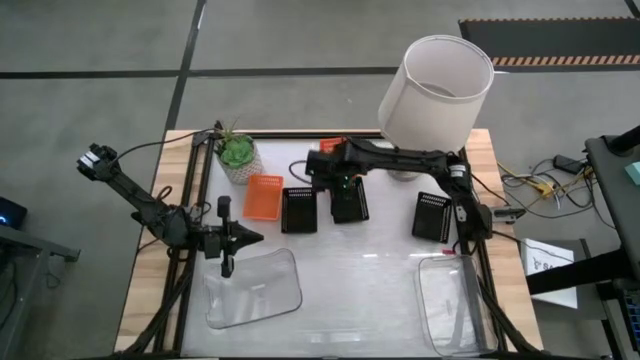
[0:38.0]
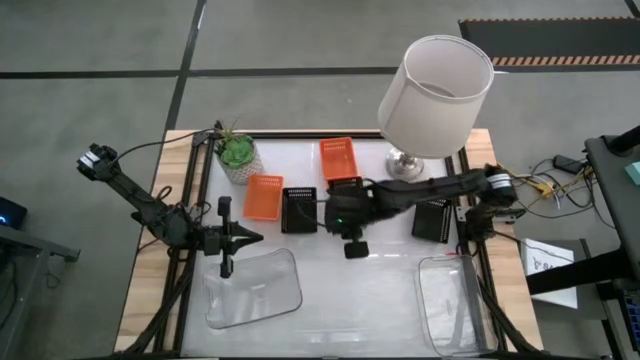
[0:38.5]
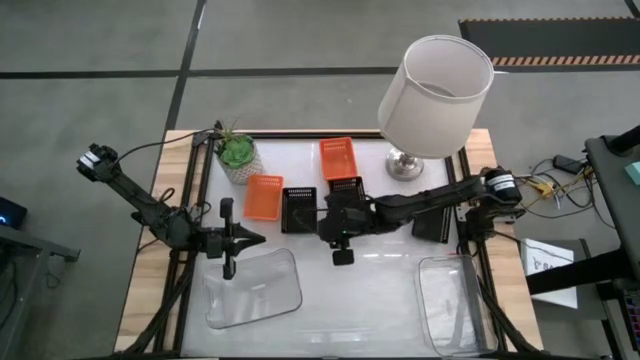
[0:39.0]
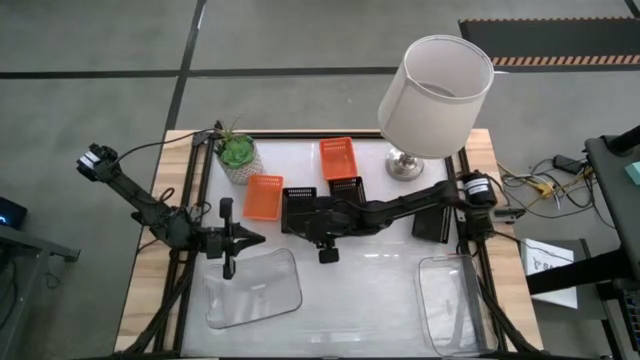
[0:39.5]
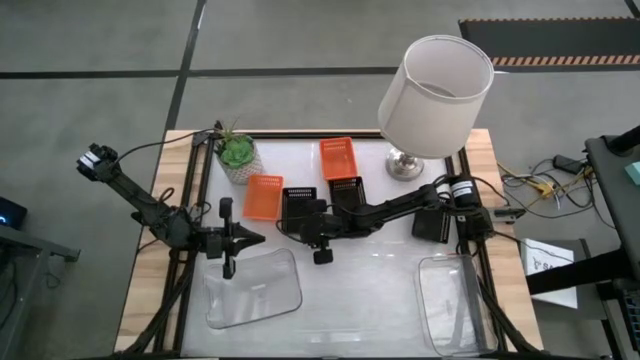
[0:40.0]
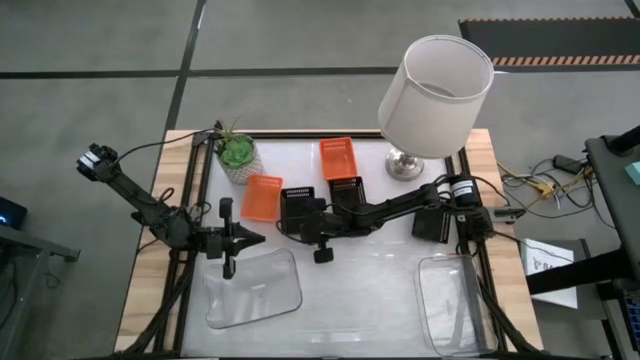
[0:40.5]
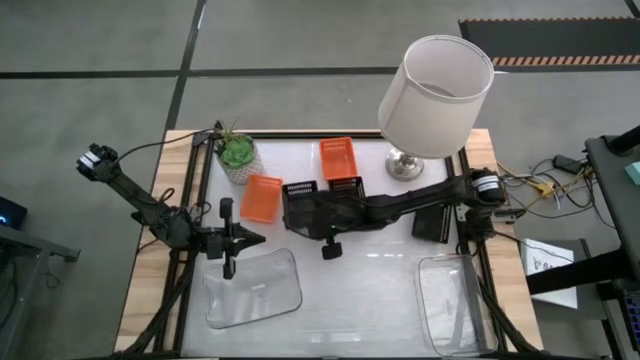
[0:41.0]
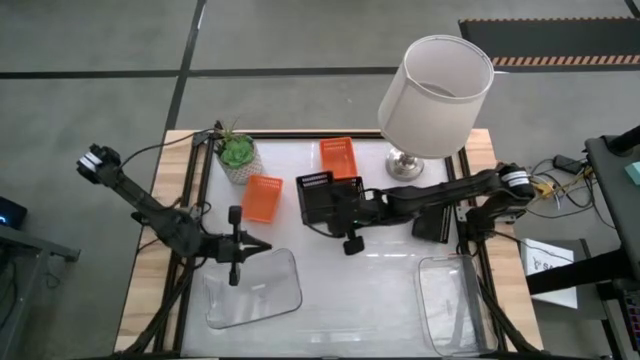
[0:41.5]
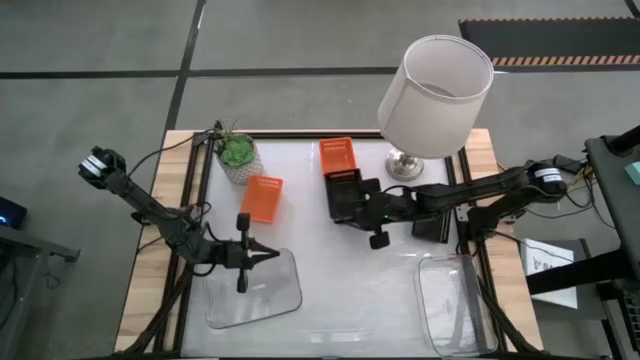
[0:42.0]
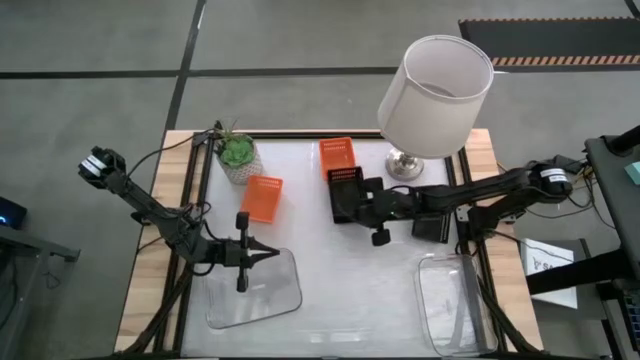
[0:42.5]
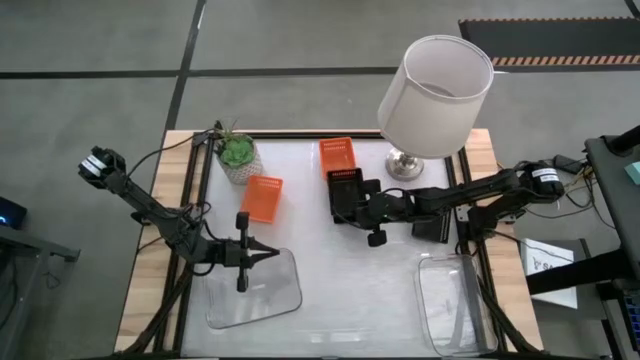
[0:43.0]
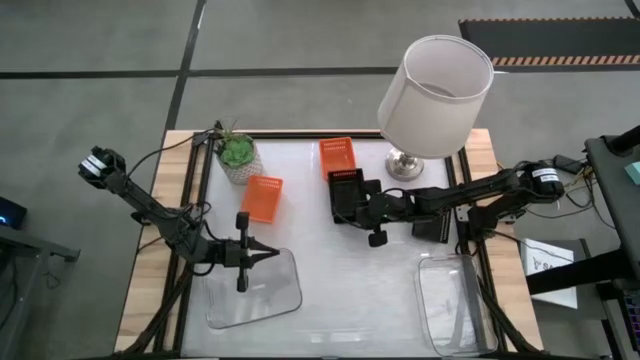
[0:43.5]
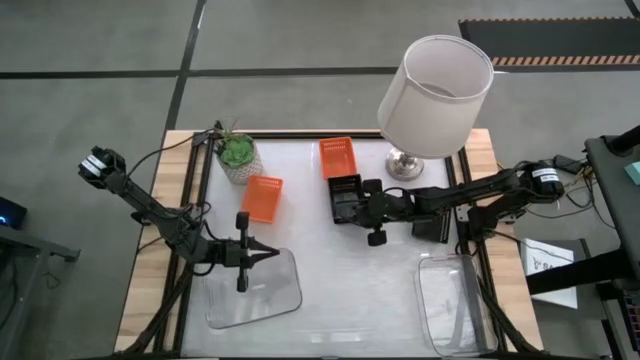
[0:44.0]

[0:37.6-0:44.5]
Stack the left black bin on the middle black bin

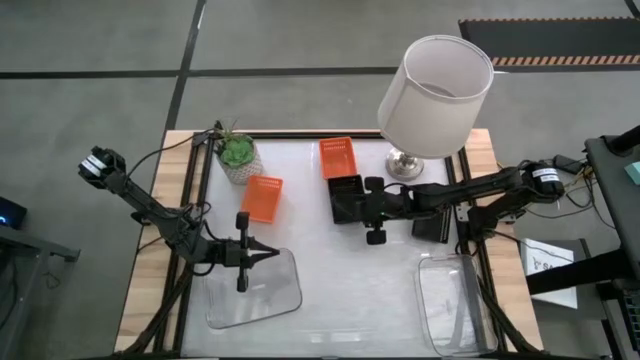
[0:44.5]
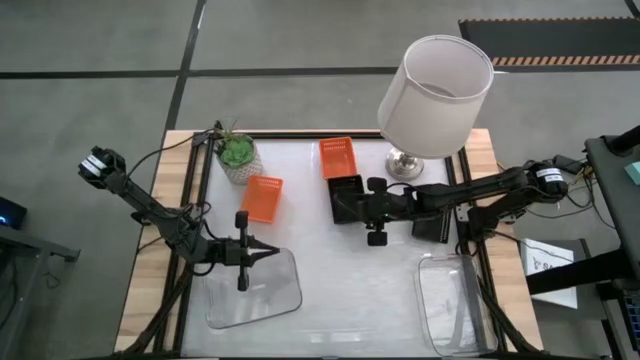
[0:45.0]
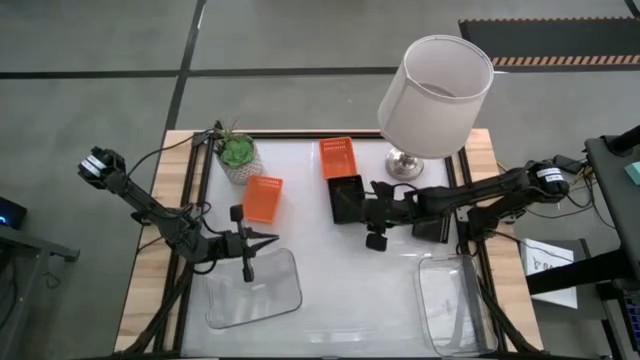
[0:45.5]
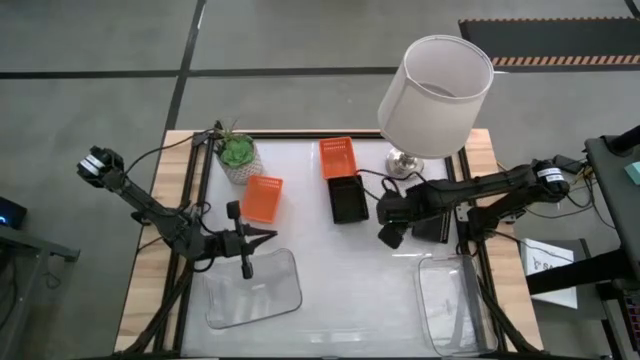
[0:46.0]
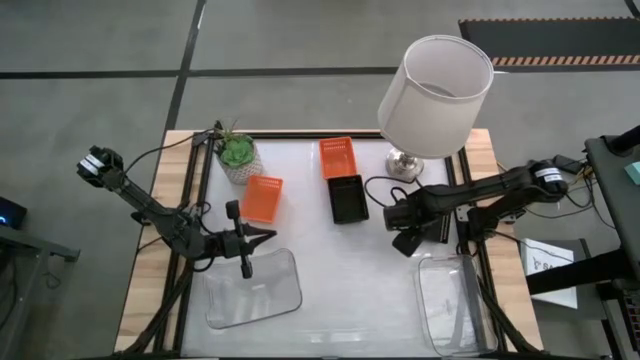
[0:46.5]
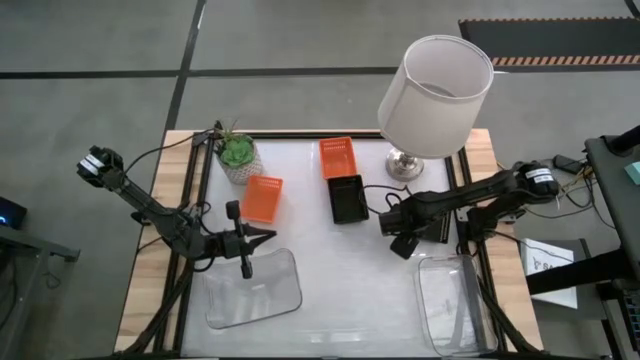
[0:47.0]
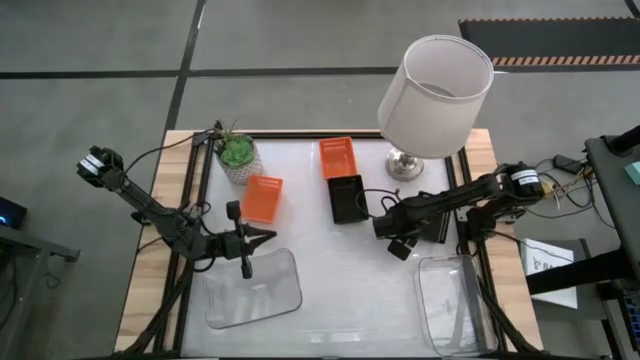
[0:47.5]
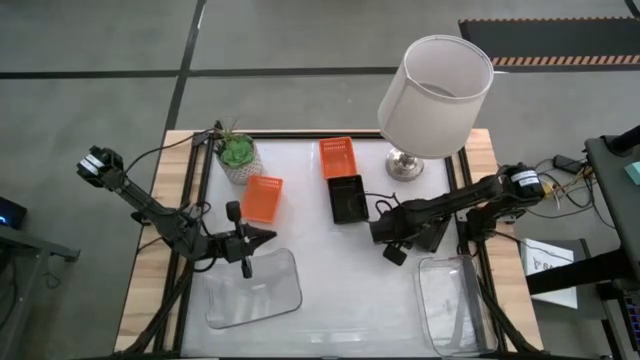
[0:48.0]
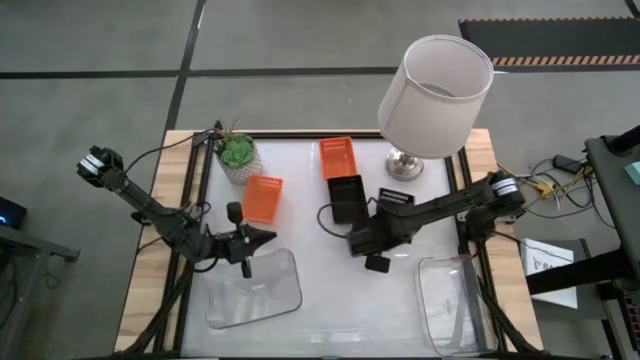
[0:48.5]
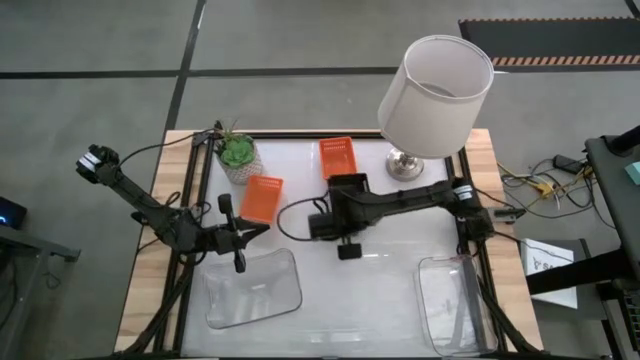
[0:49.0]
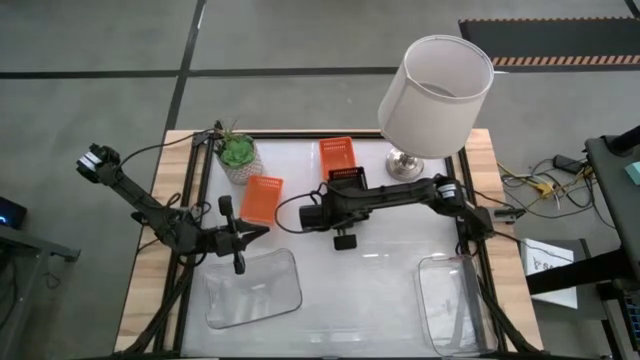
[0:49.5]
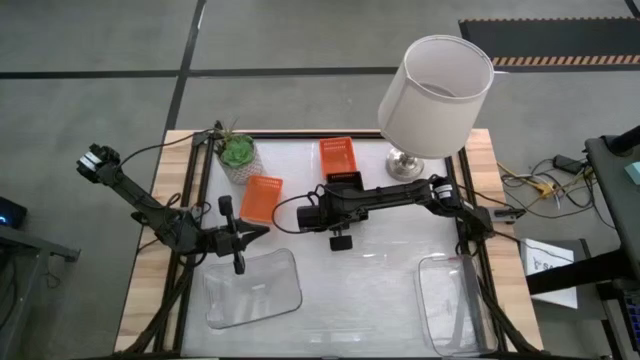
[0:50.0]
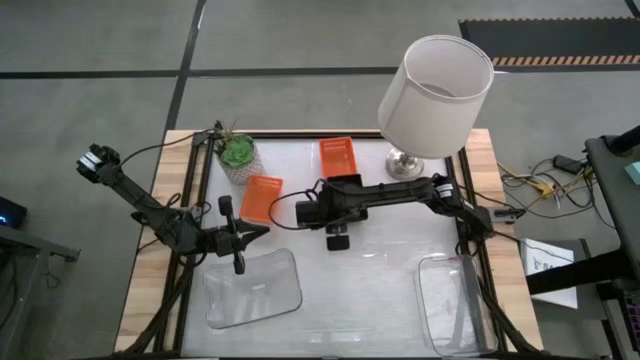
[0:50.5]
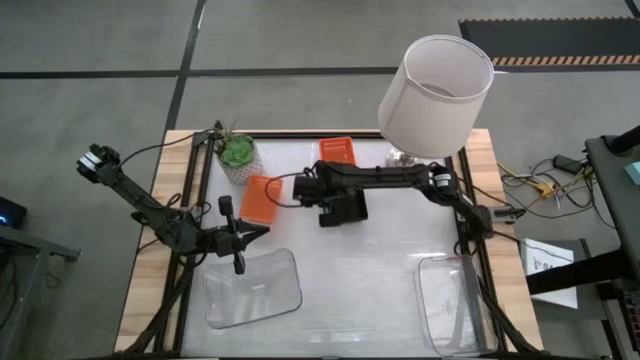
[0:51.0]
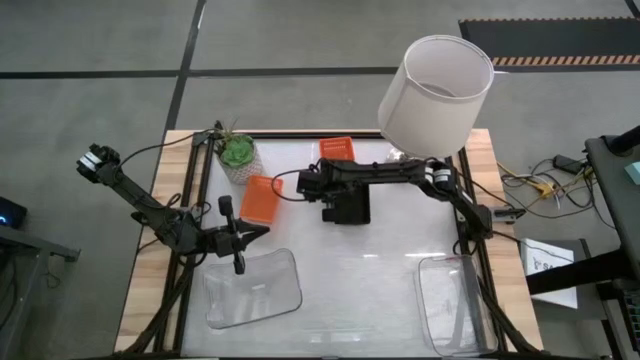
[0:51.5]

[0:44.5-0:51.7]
Stack the right black bin on the stacked black bins

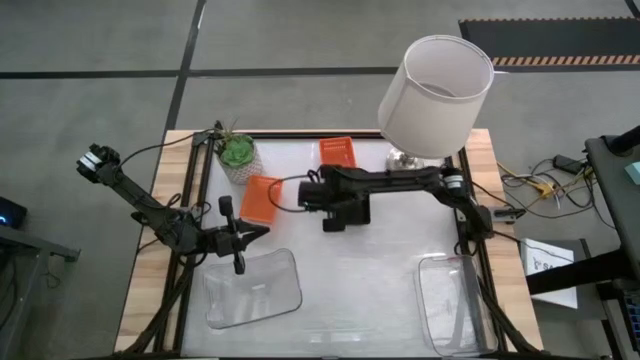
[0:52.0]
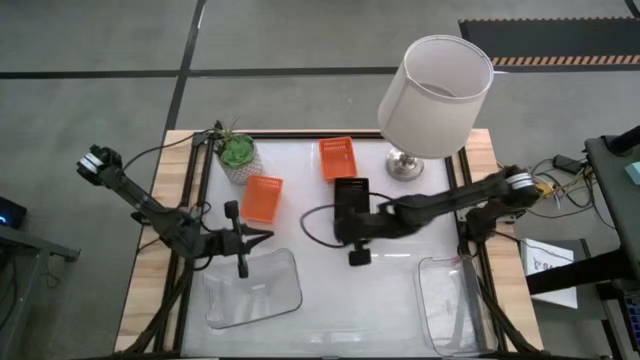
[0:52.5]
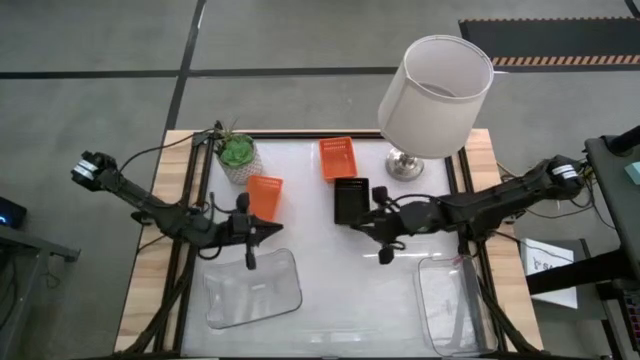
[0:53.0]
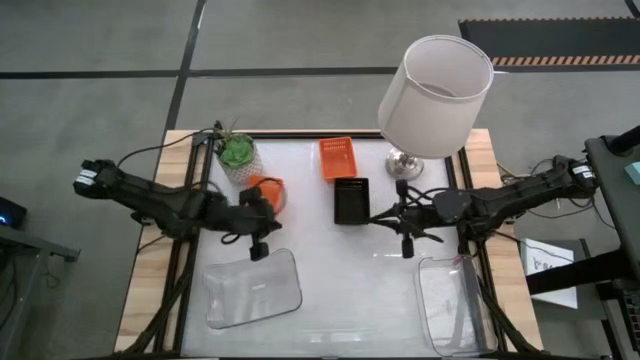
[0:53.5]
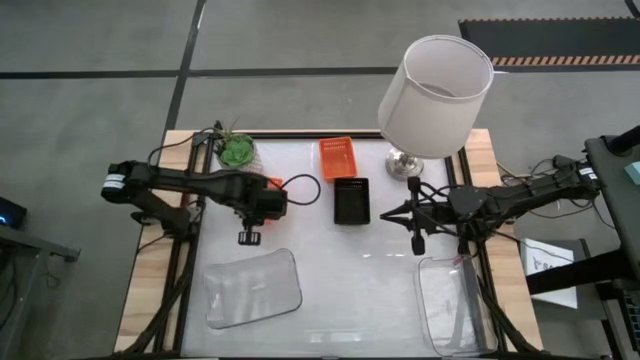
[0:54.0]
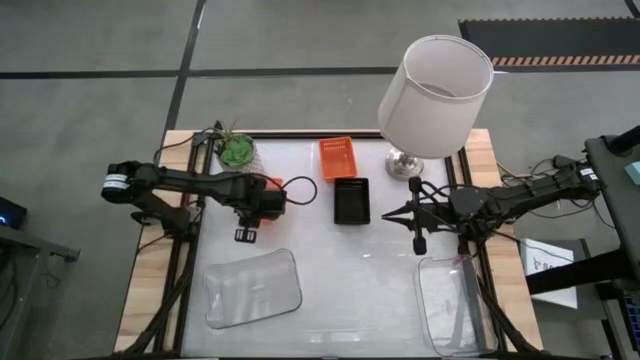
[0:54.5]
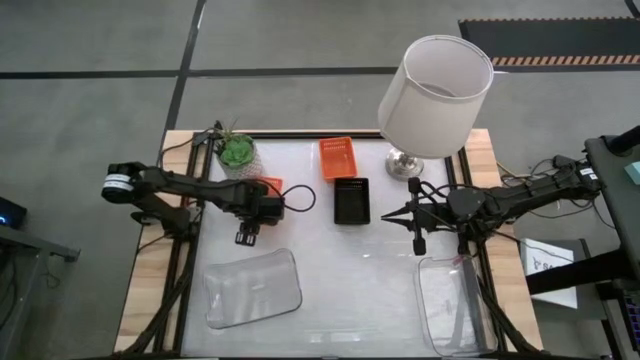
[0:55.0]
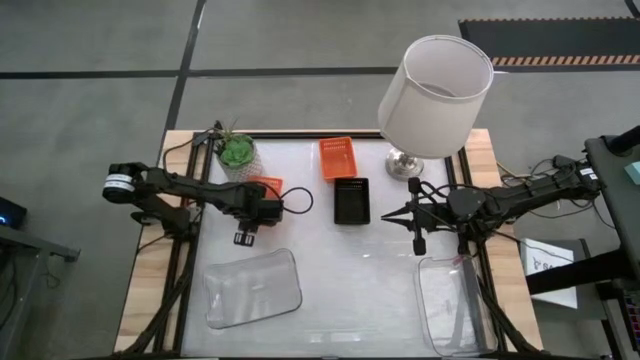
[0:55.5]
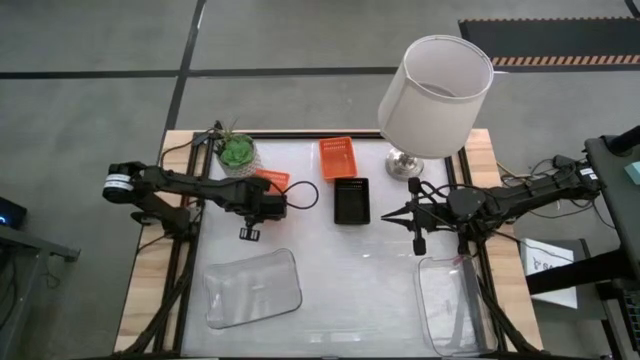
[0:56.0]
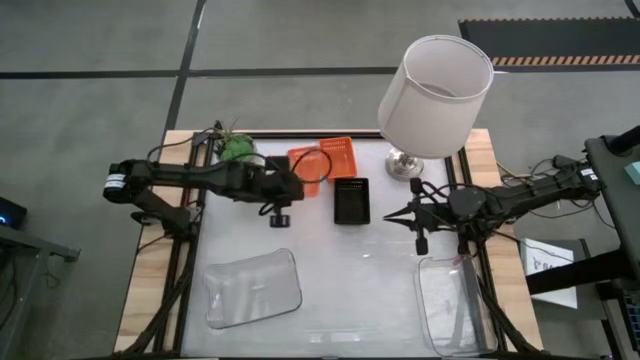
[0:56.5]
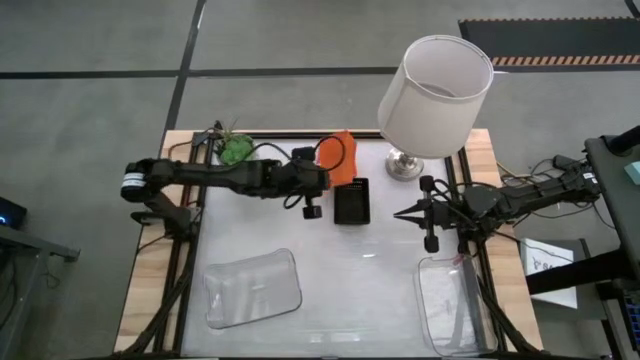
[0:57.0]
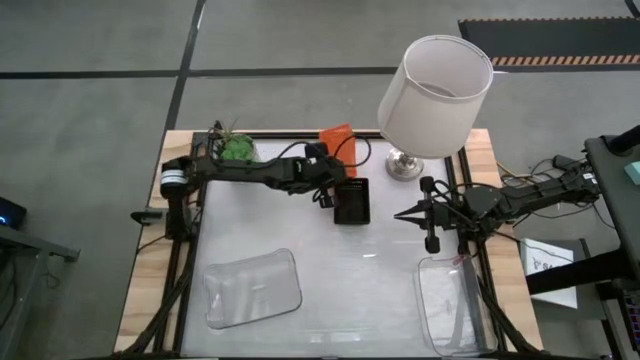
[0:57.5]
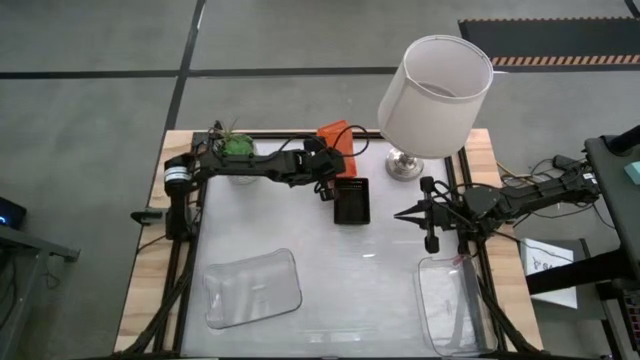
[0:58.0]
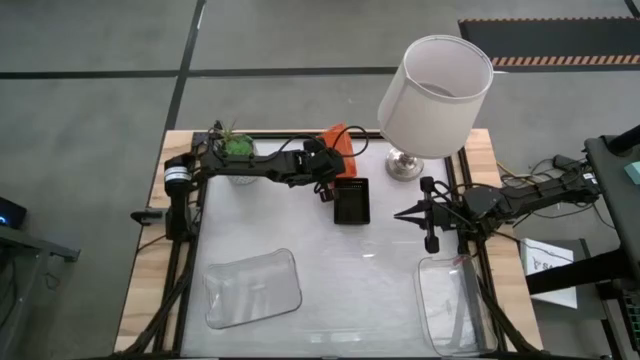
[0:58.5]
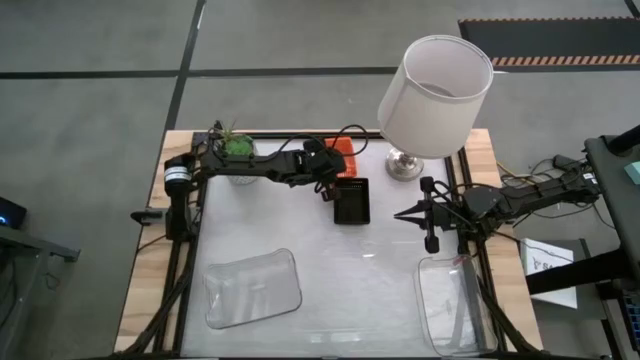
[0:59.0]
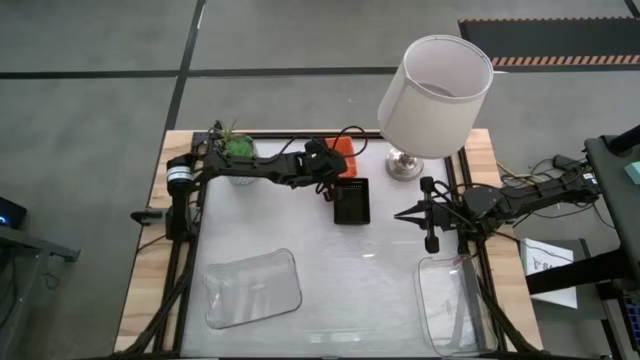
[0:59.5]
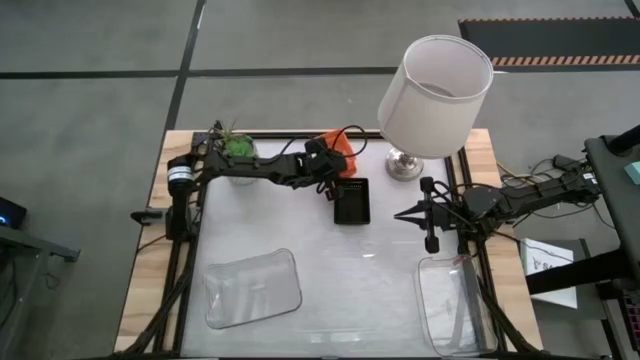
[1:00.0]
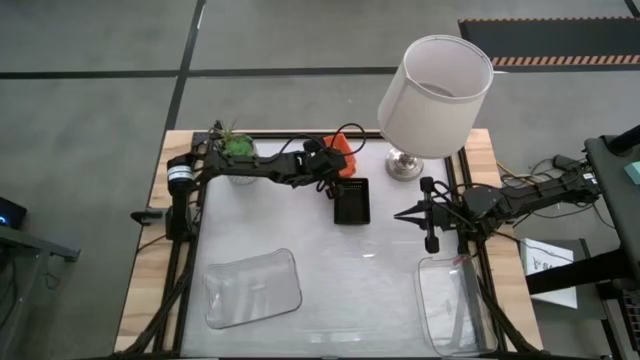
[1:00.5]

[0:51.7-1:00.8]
Stack the left orange bin on the stacked orange bins
